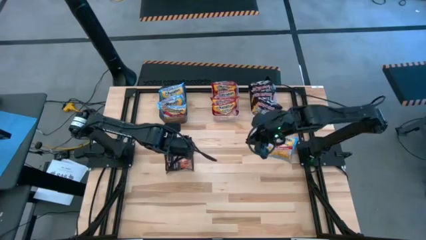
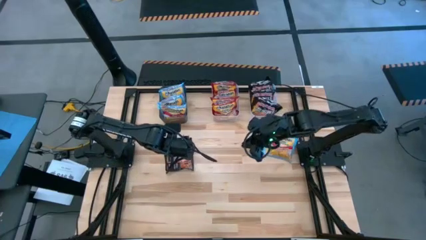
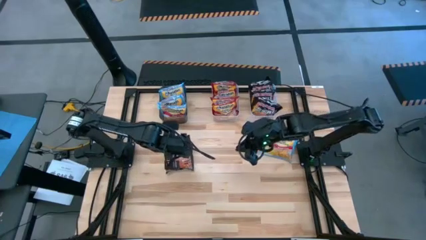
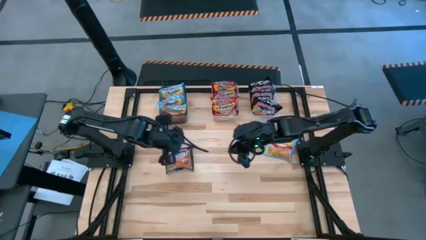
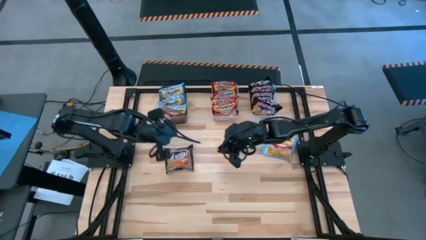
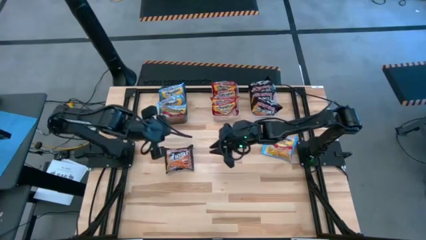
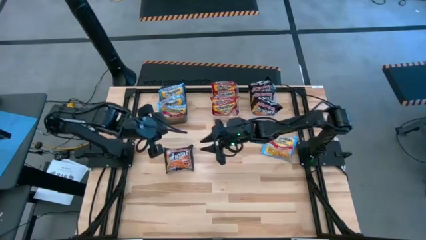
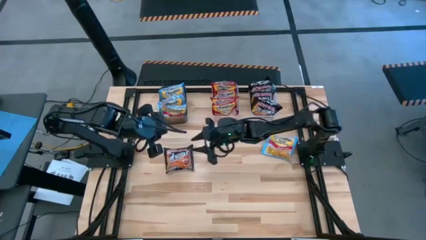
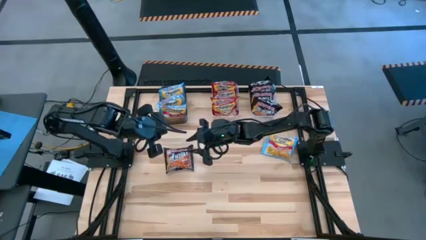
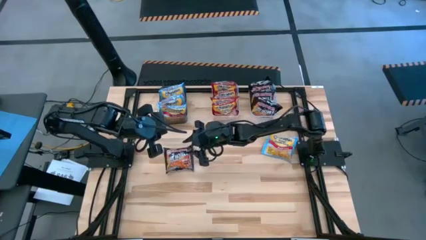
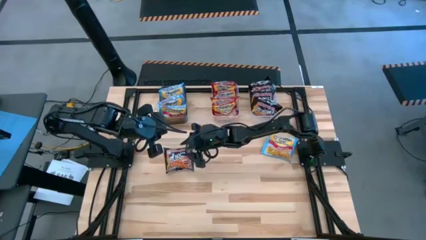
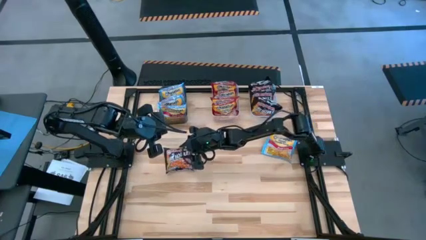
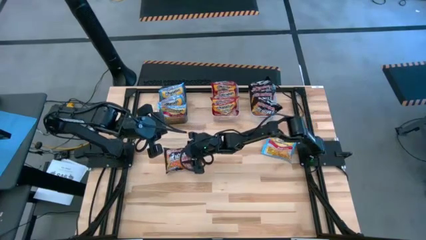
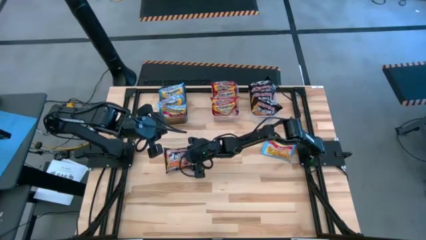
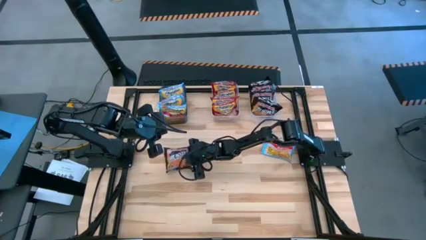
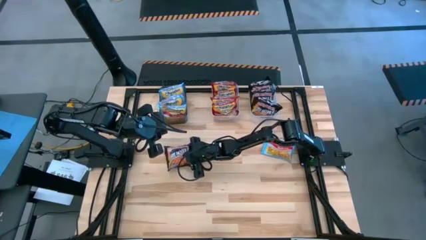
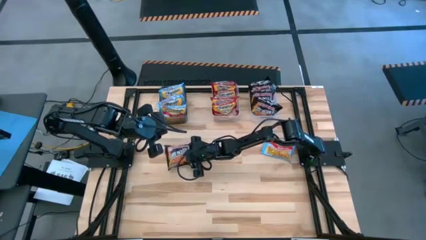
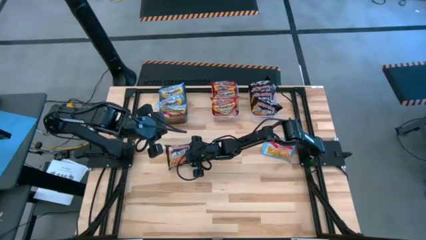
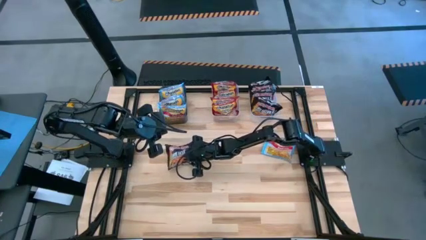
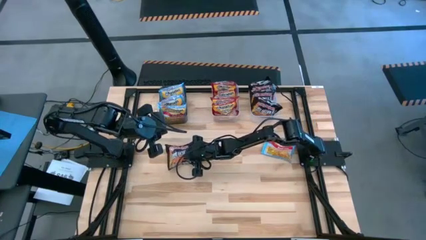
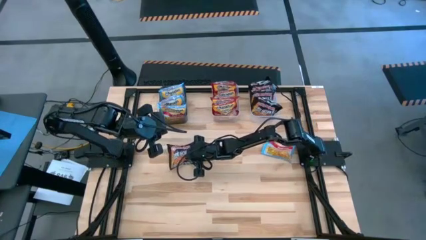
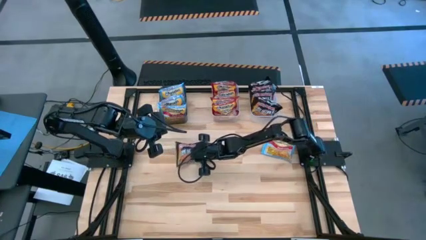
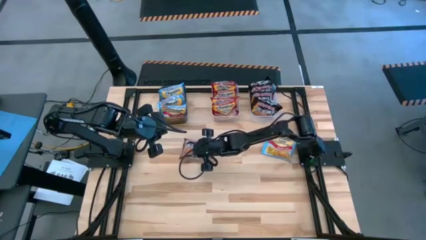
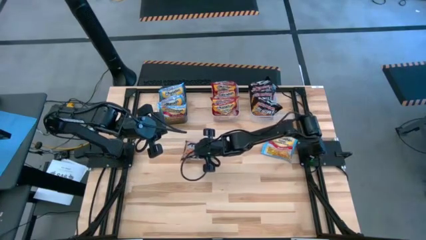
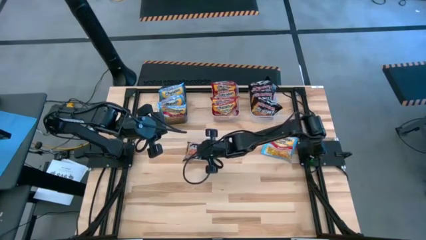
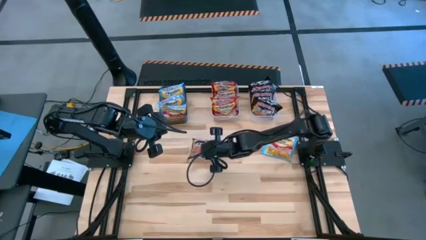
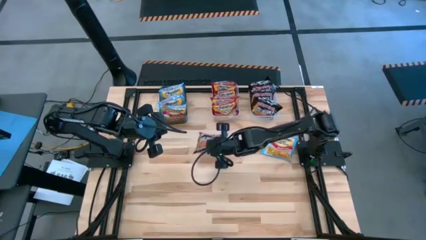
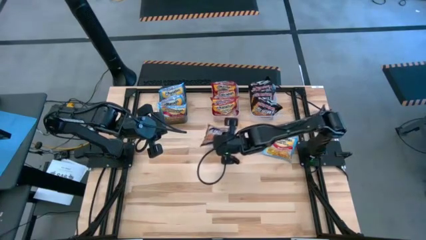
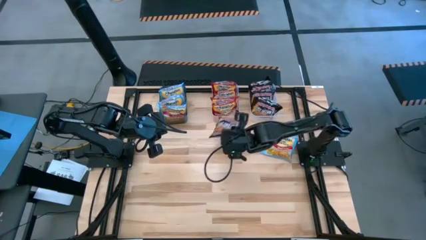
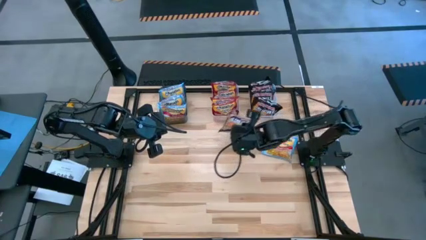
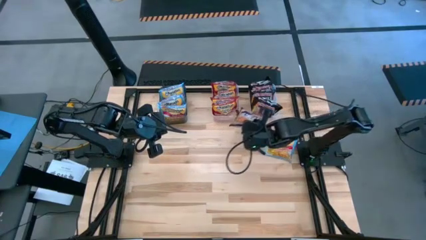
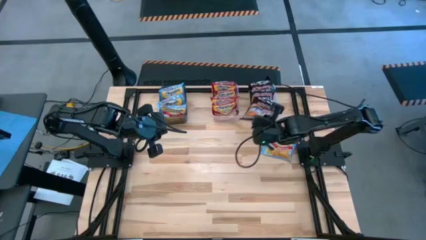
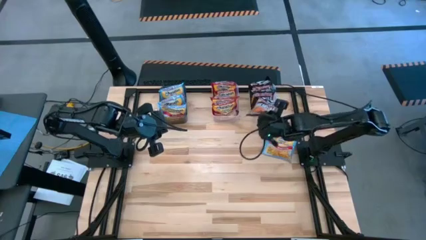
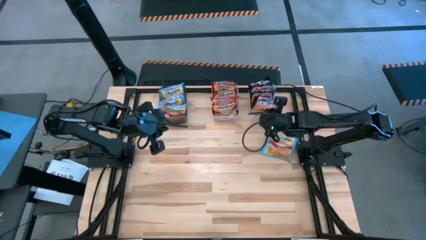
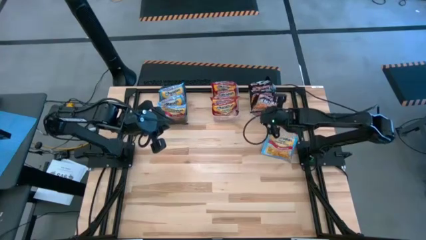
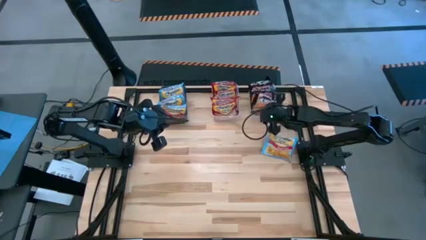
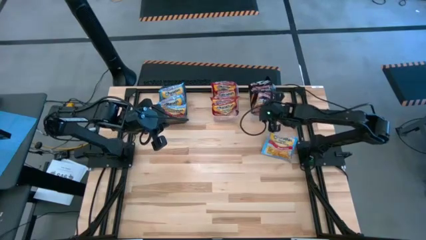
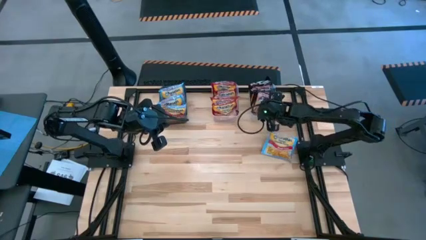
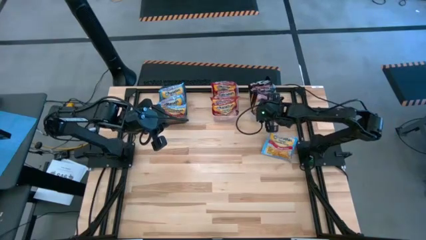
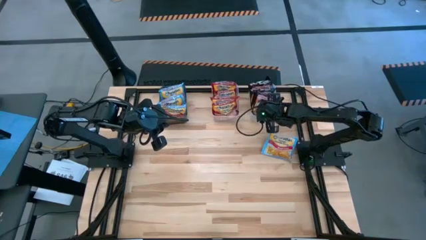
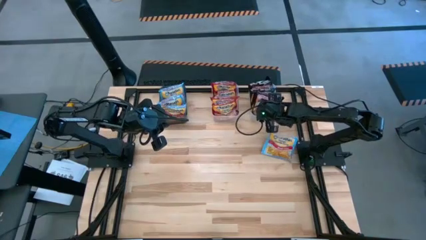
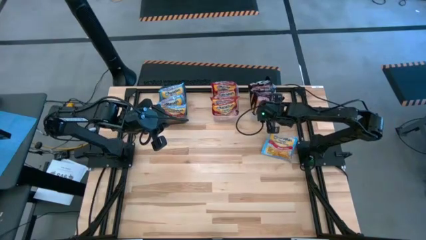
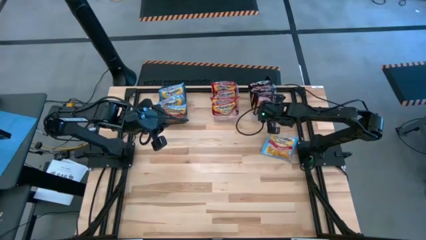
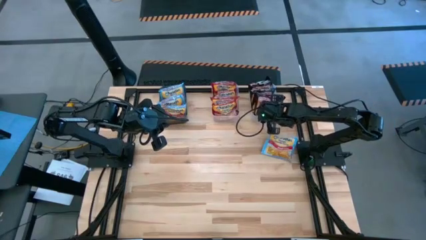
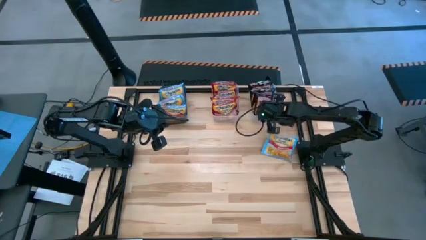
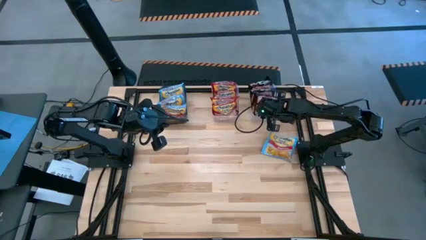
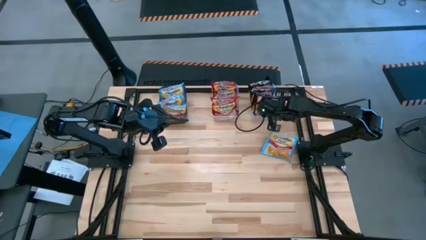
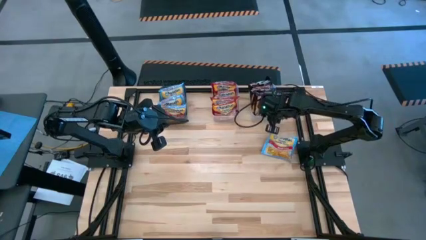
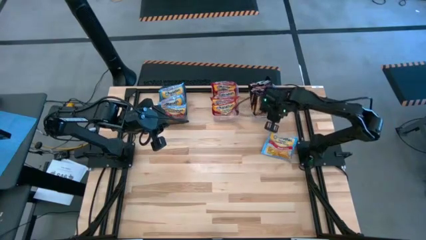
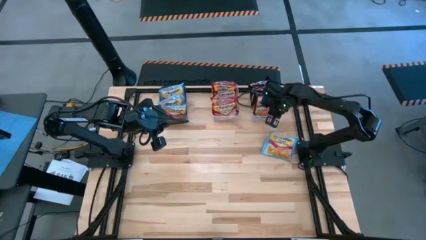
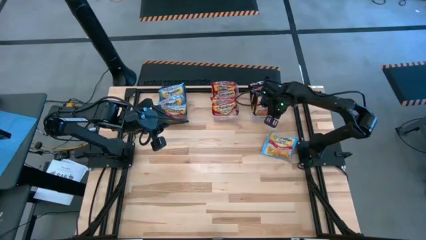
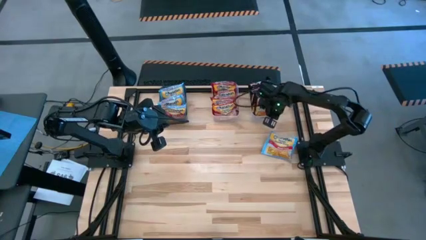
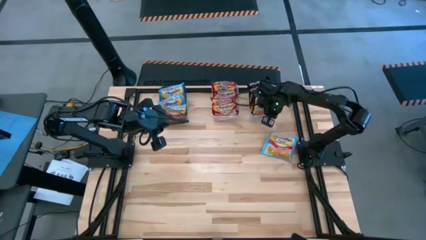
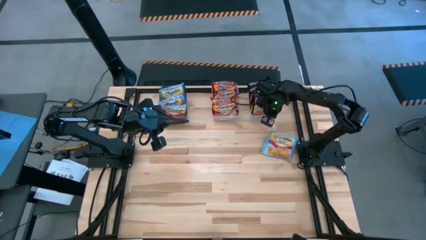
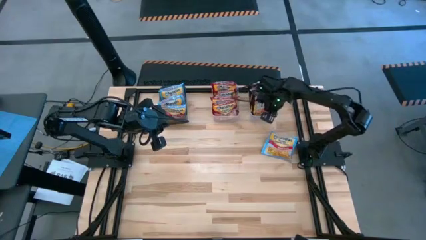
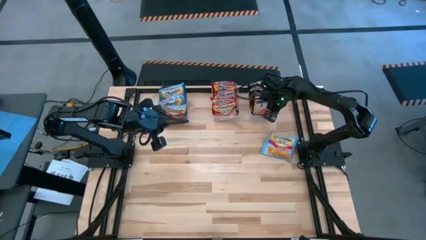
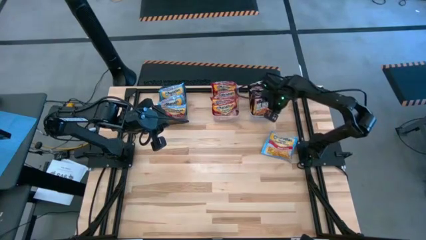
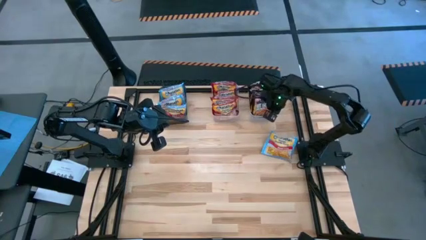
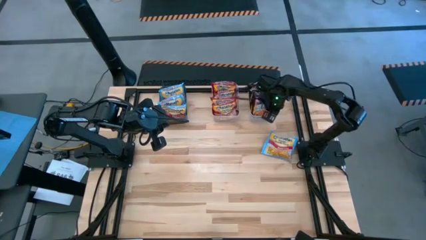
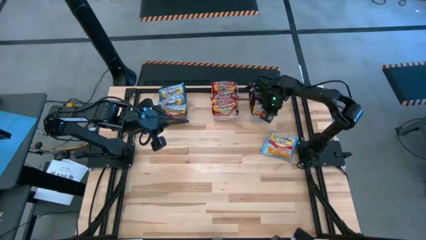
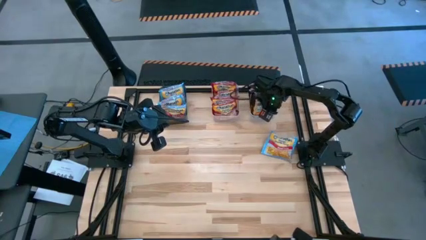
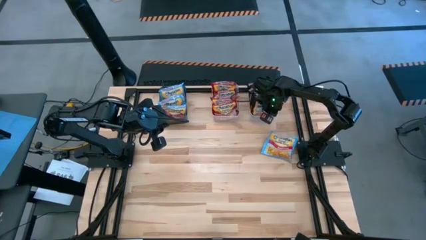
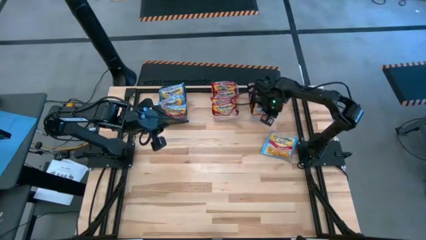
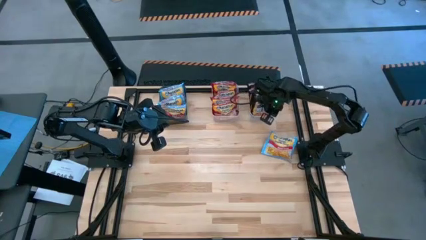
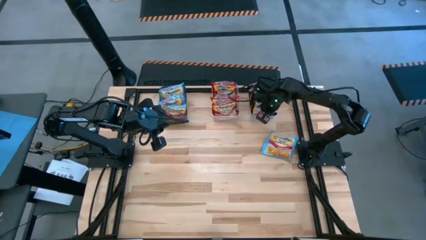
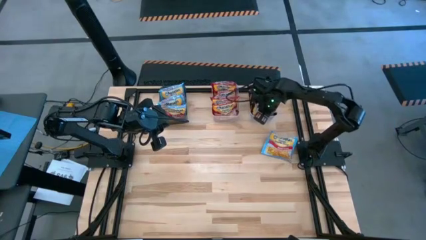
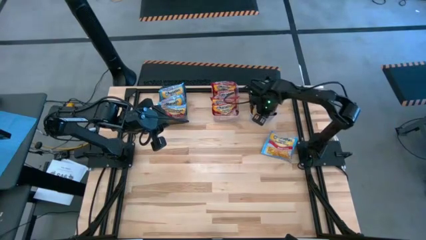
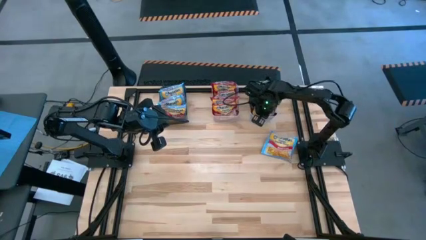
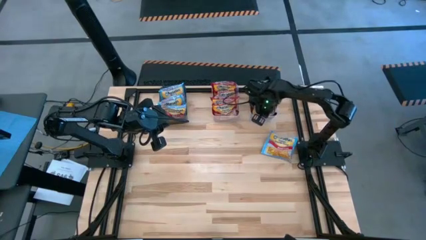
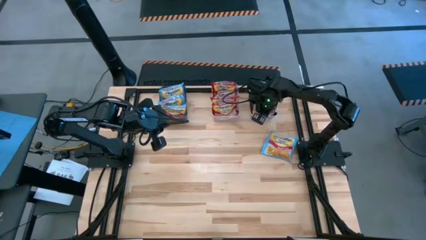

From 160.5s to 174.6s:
Task: Sort Maruchan noodles
Put the black noodle pack into the right transparent bin

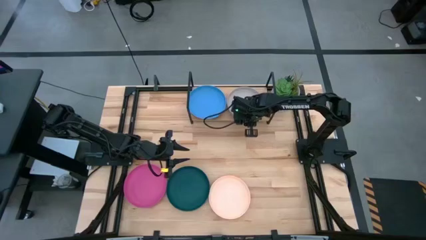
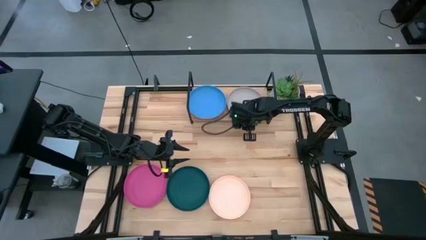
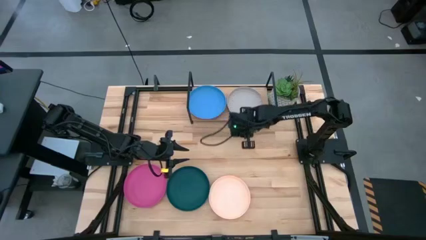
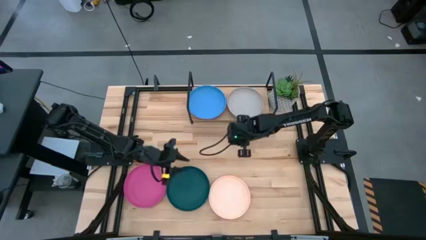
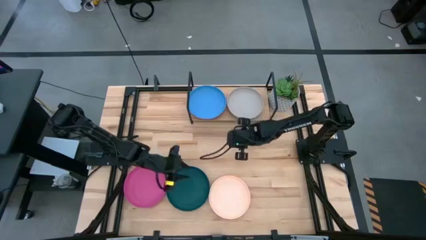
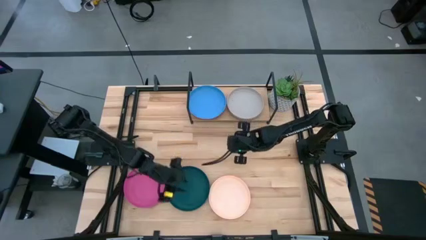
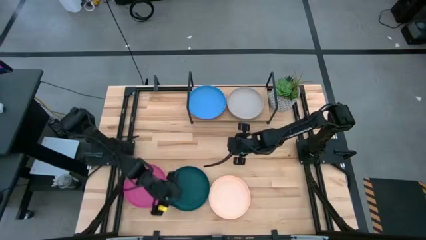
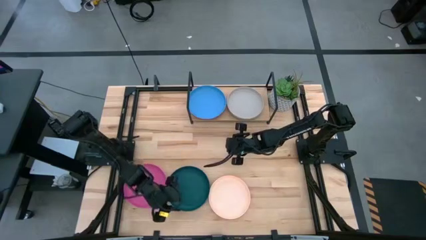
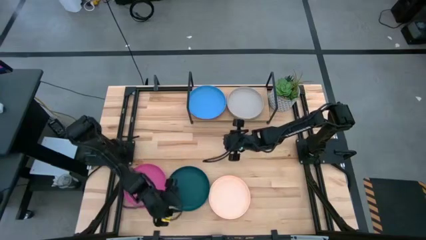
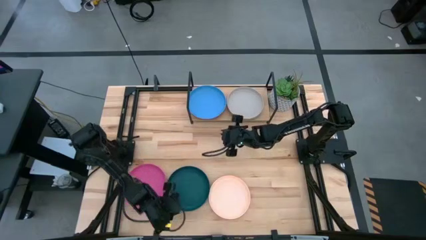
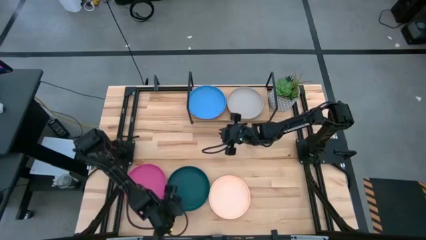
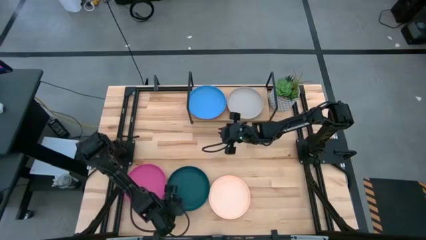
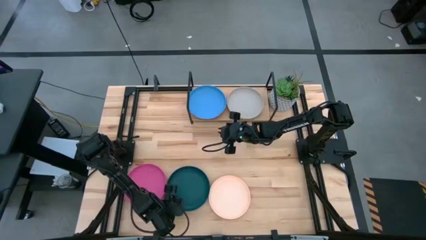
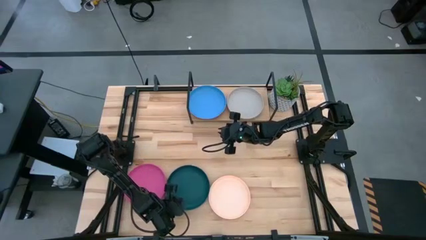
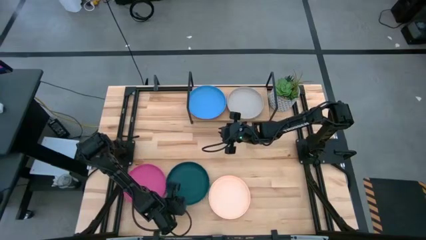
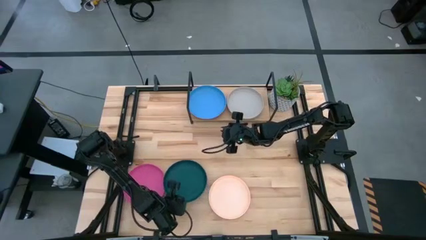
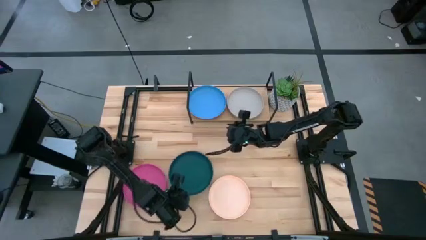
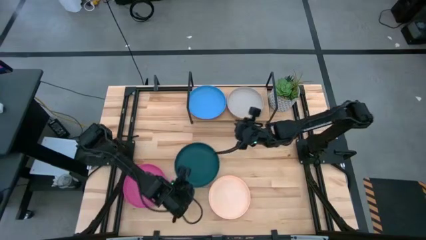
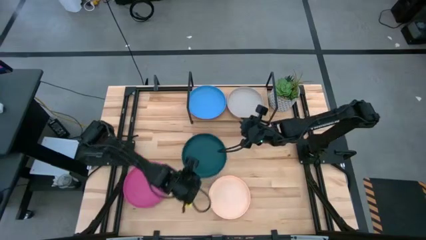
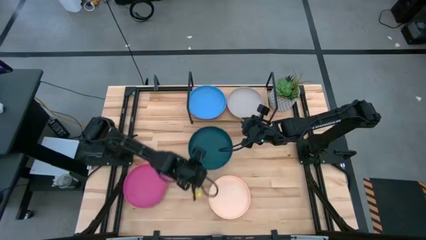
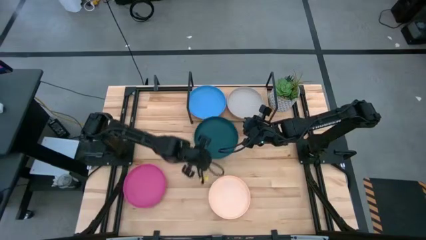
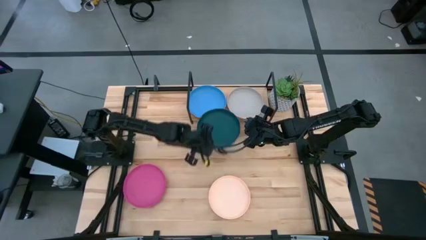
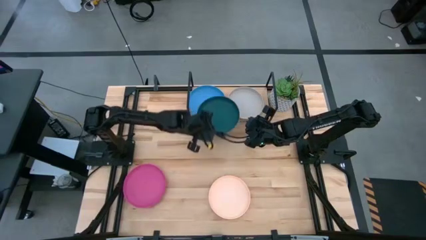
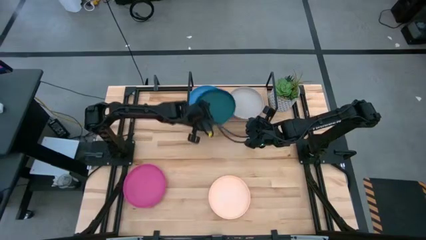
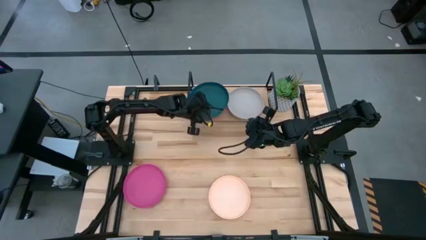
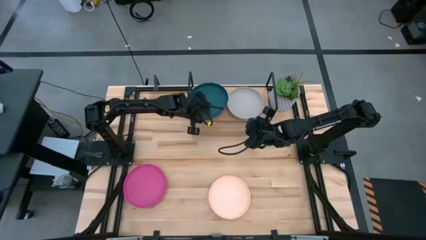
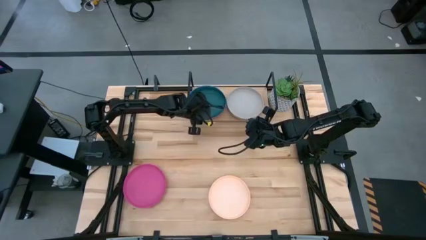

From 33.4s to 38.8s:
Task: Place and stack plates onto a shelf
Stack the green plate on top of the blue plate on the shelf
